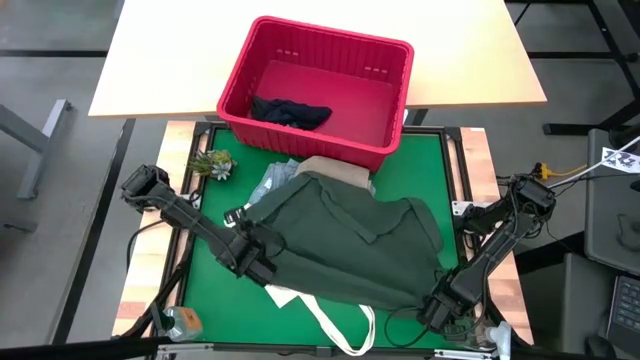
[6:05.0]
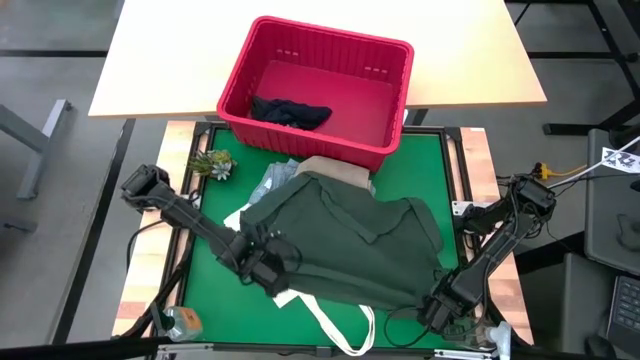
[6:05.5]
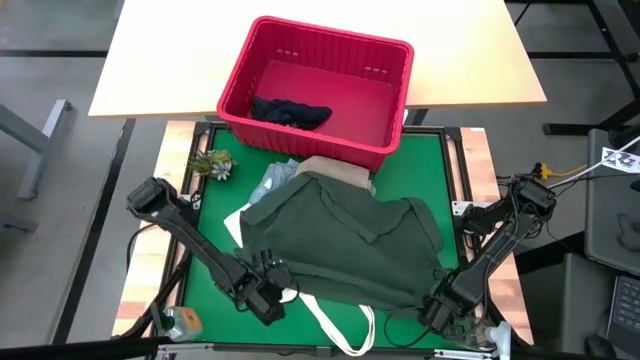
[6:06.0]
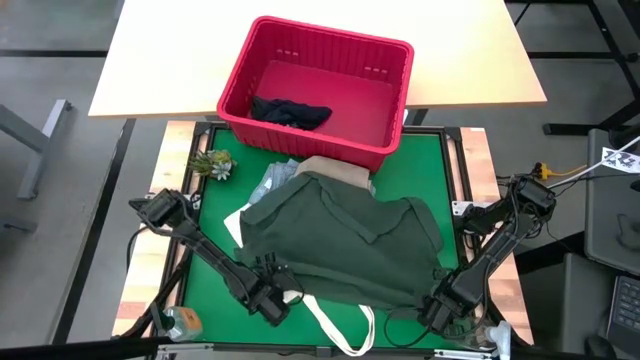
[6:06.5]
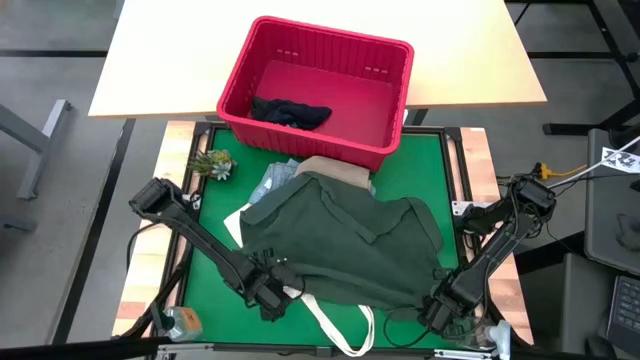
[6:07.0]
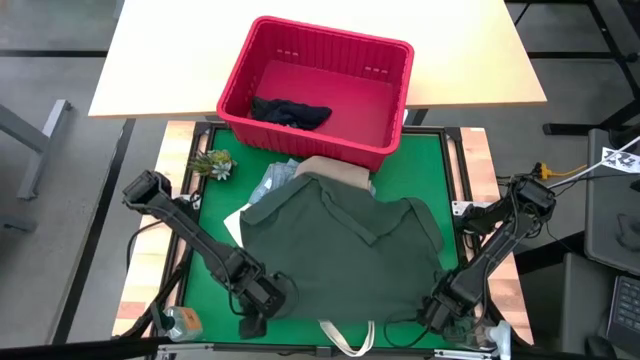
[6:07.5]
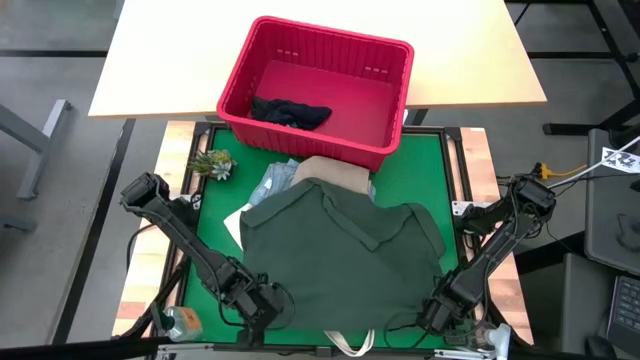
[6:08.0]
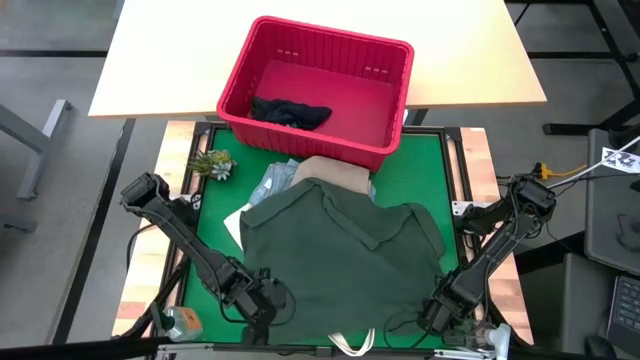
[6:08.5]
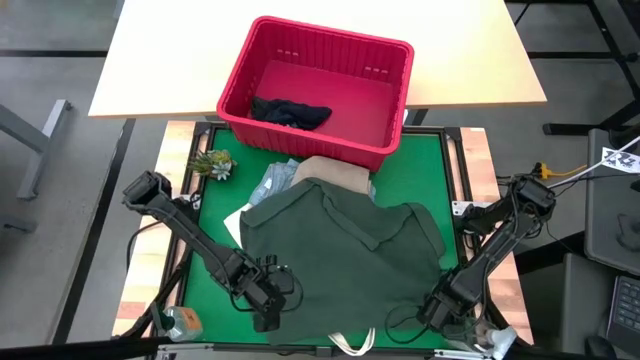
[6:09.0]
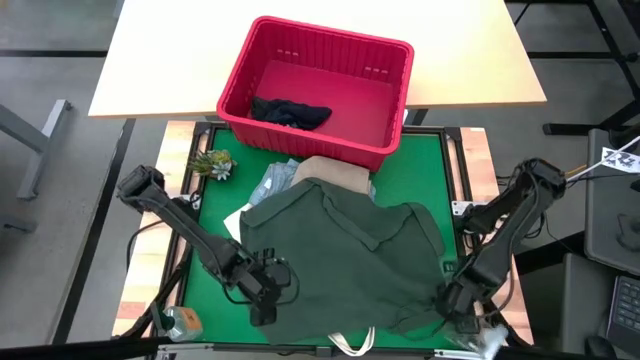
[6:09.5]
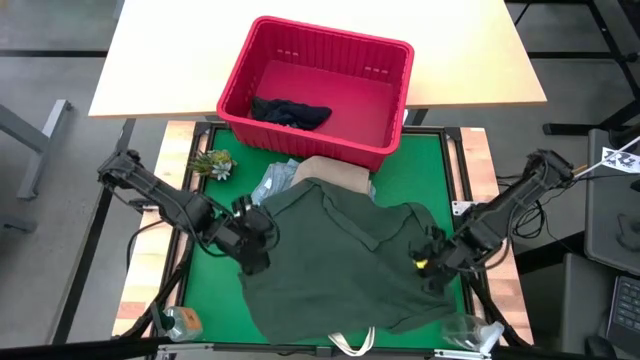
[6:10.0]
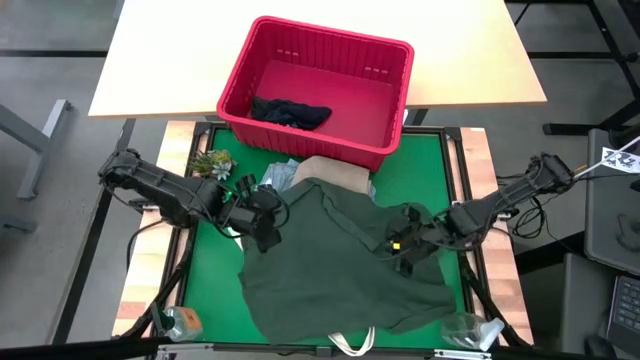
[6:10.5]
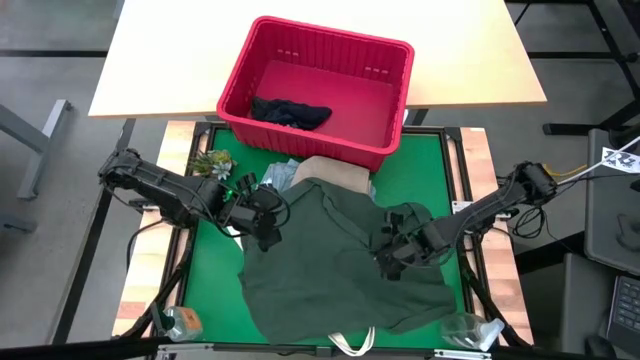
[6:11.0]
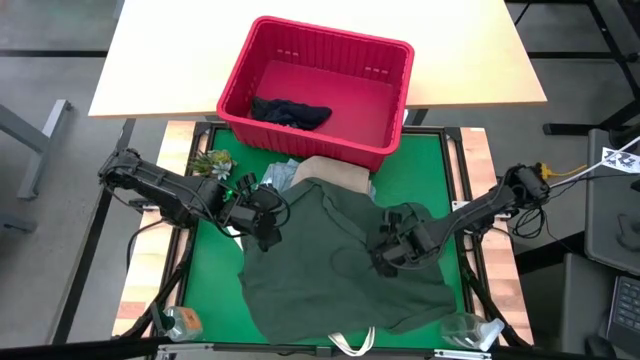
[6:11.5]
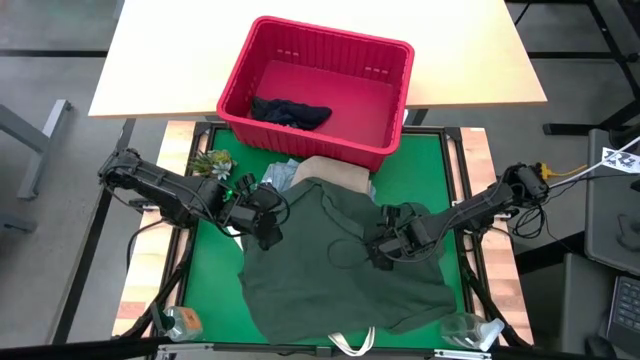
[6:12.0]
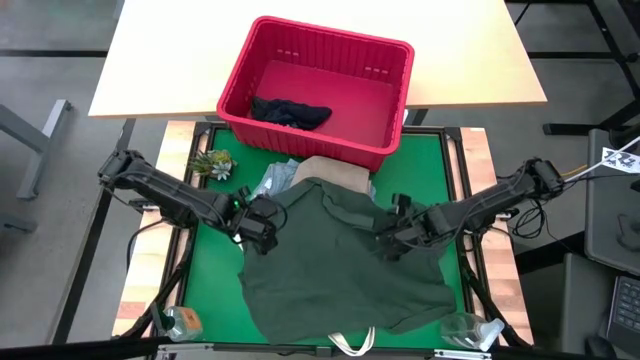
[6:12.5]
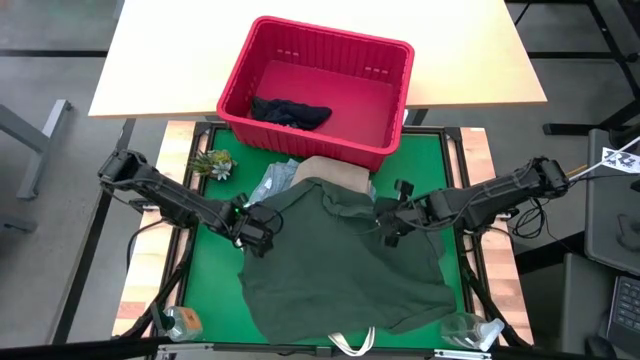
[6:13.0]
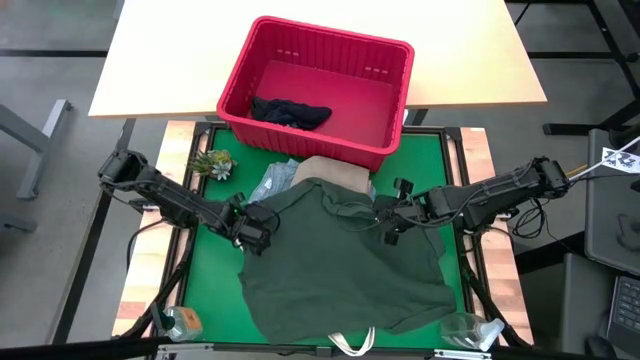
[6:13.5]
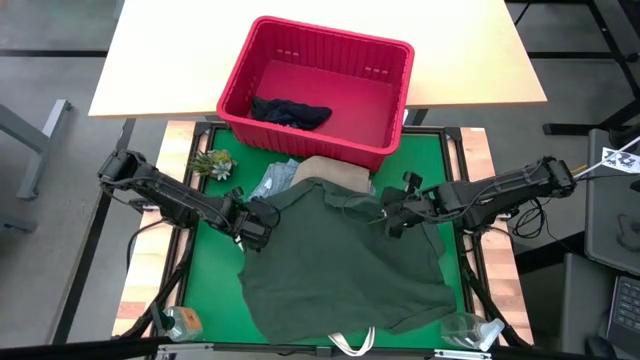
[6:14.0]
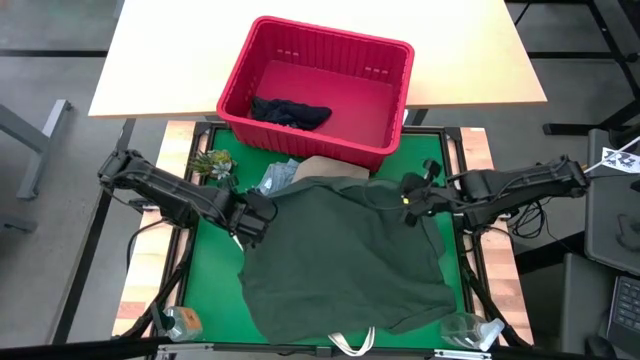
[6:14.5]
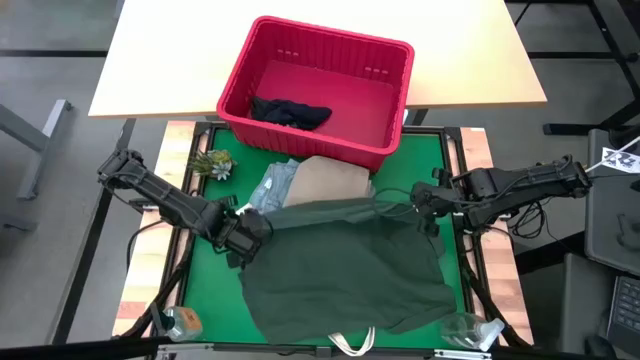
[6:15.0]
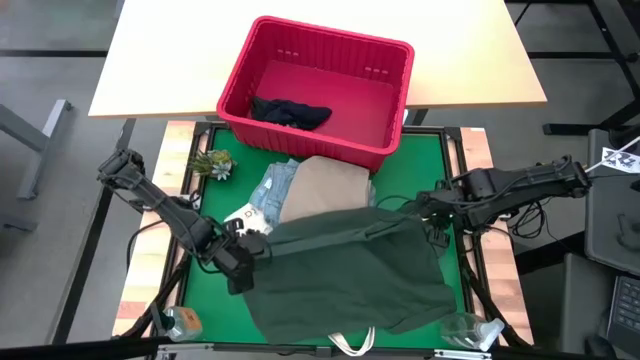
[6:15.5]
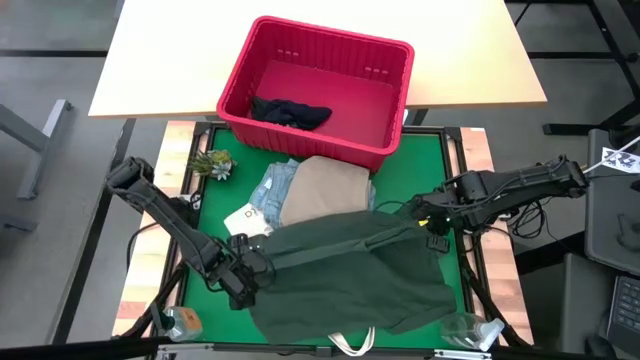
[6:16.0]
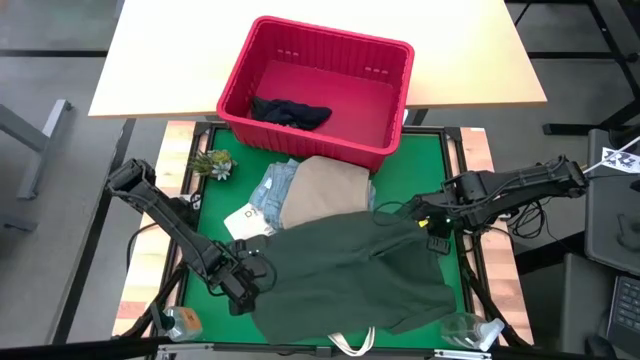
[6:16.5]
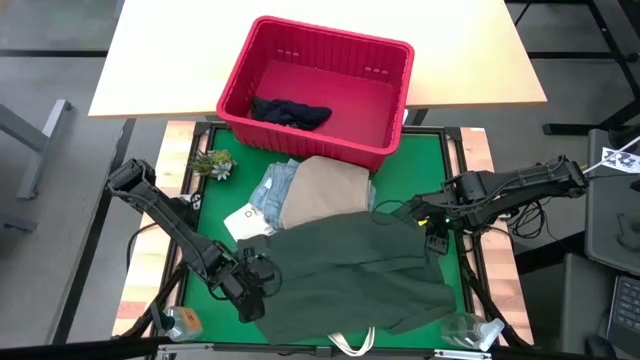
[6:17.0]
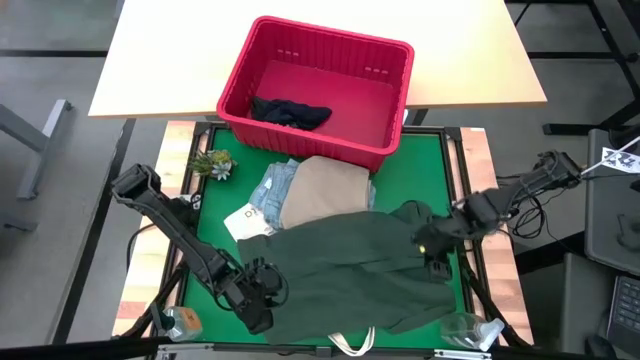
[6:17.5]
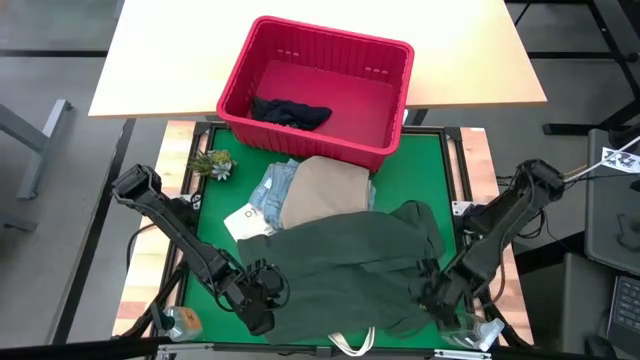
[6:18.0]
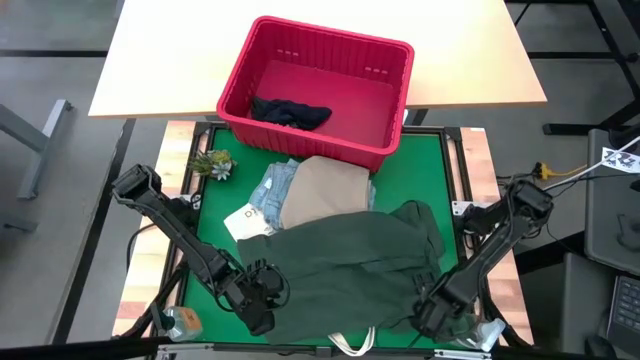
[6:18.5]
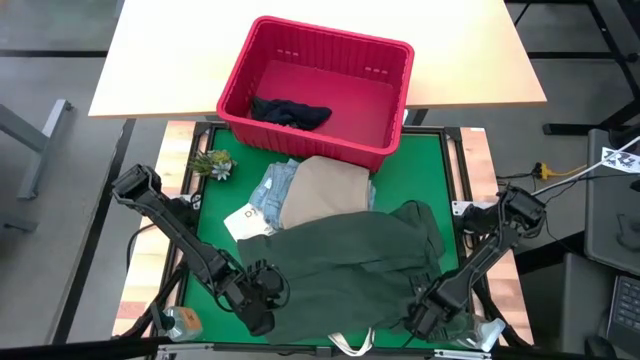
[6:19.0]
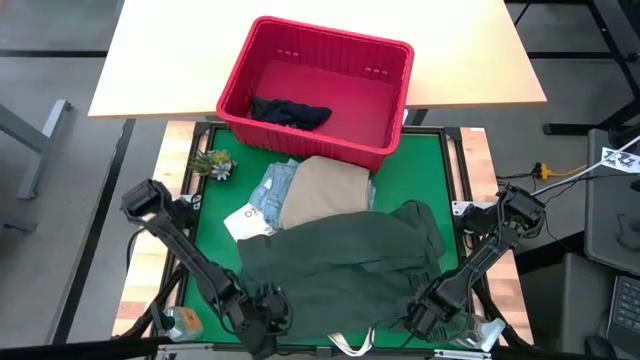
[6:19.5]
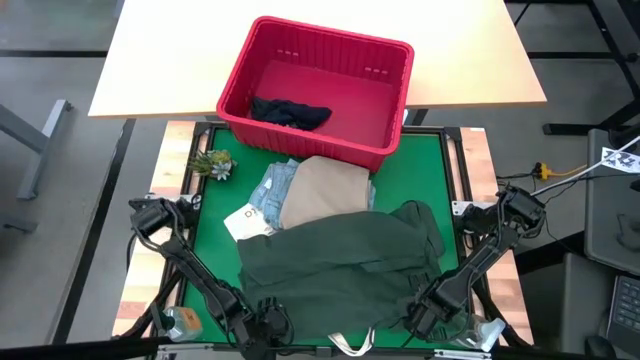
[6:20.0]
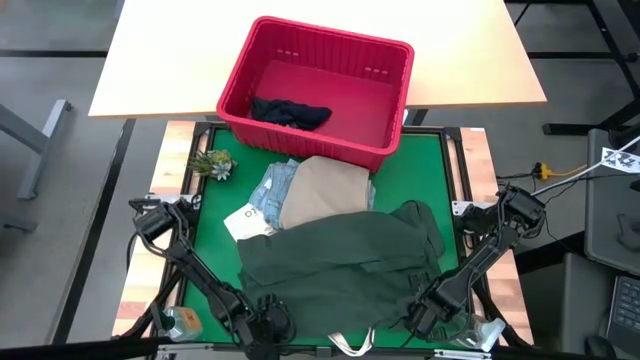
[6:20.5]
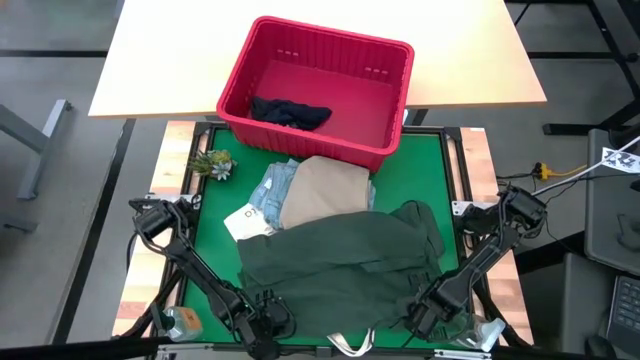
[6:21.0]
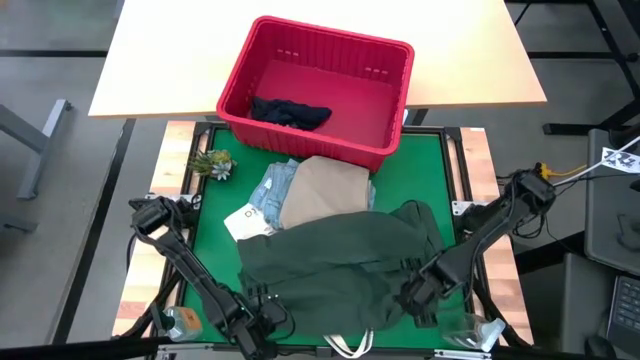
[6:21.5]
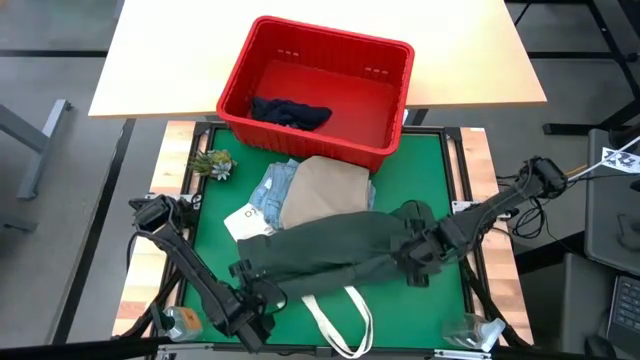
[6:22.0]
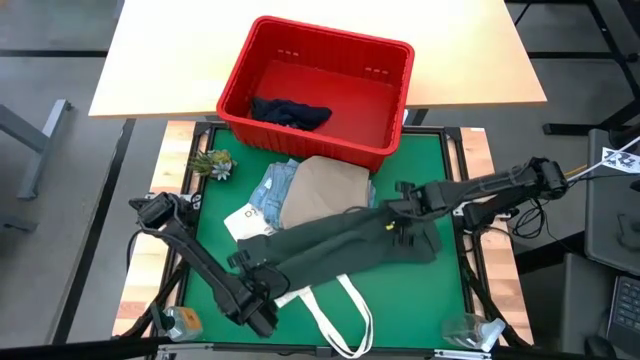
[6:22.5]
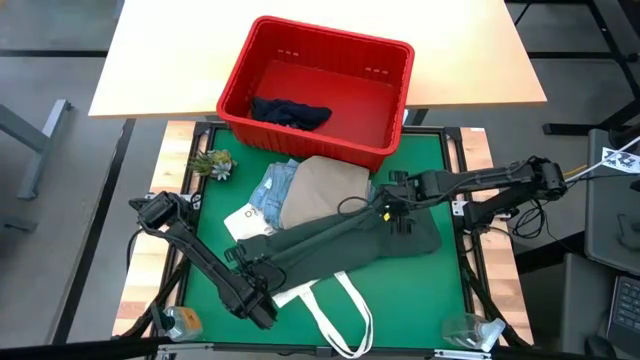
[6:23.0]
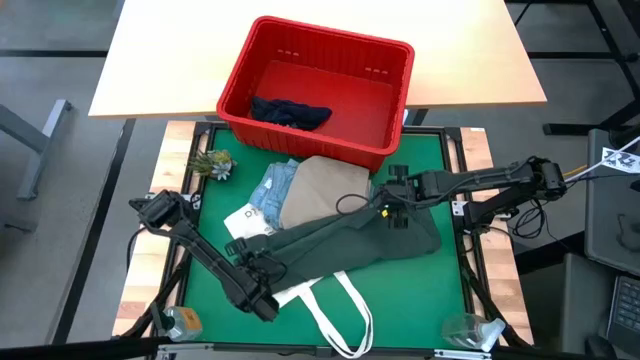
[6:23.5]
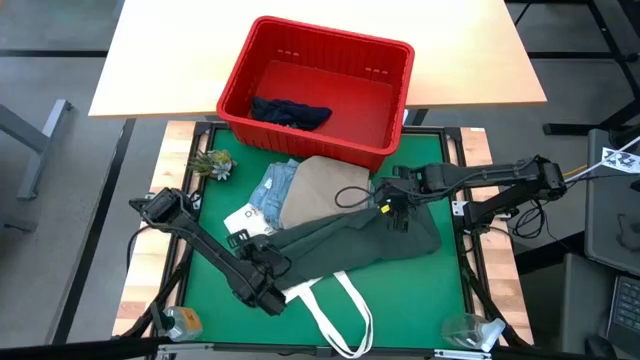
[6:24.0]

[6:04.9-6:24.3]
Task: Fold Laundry from Bin
Fold the green shirt
